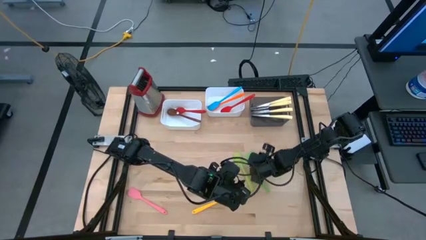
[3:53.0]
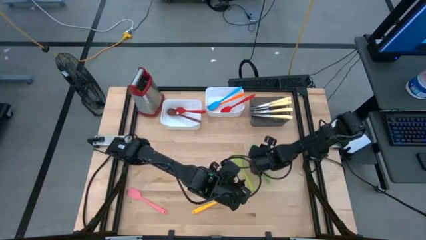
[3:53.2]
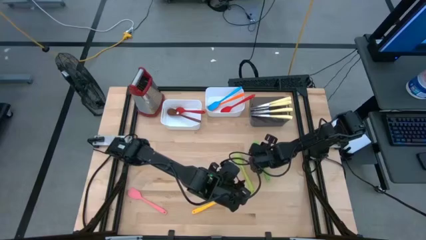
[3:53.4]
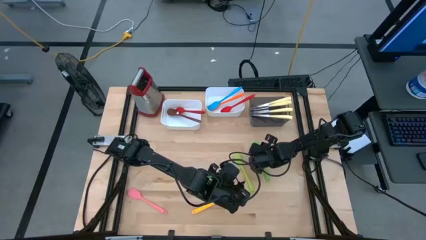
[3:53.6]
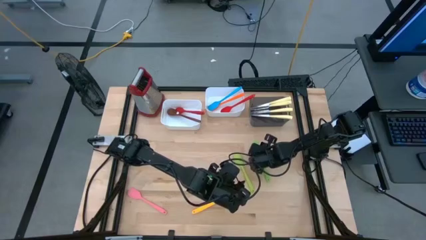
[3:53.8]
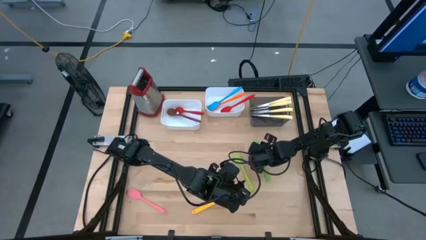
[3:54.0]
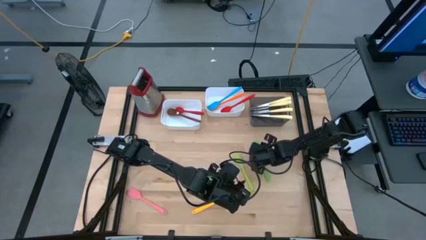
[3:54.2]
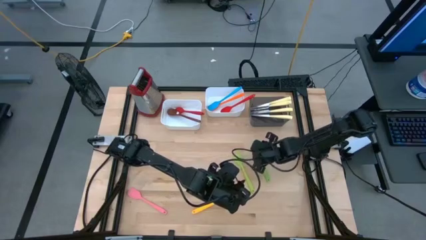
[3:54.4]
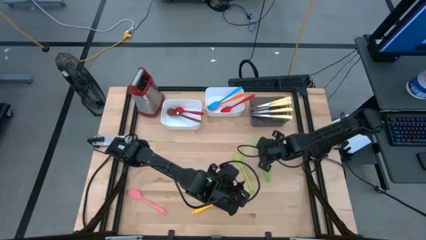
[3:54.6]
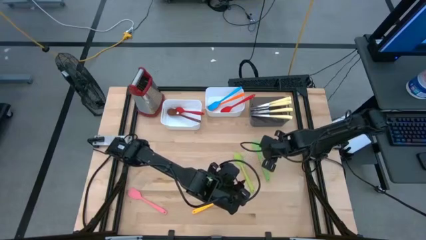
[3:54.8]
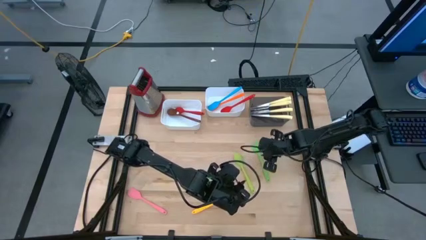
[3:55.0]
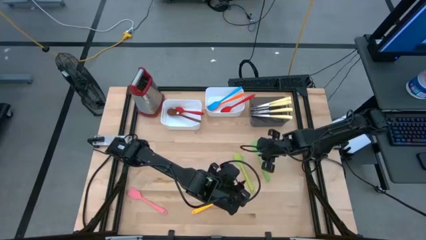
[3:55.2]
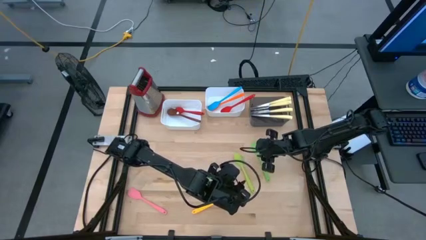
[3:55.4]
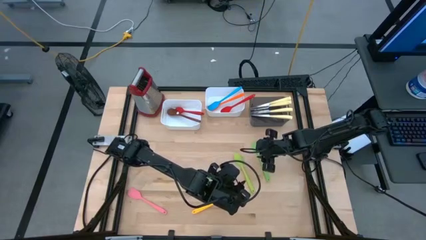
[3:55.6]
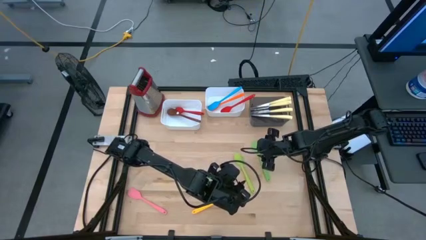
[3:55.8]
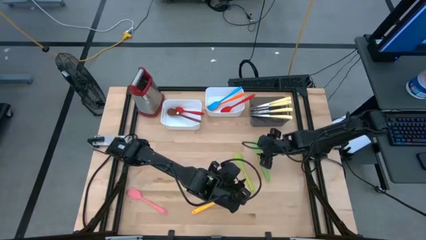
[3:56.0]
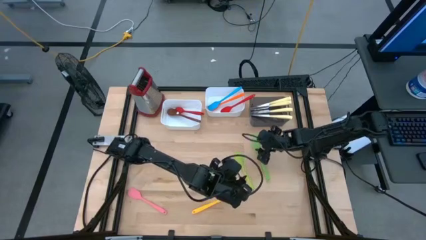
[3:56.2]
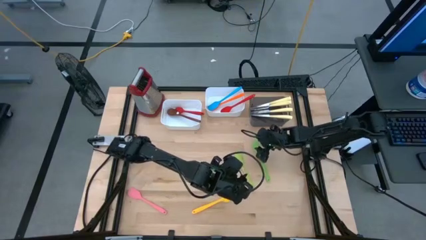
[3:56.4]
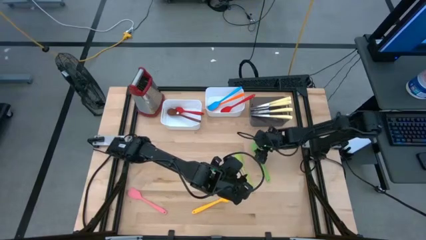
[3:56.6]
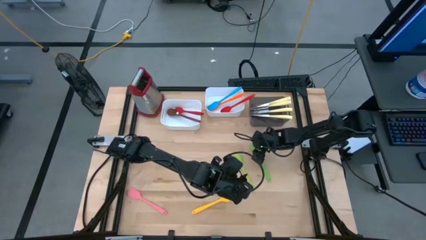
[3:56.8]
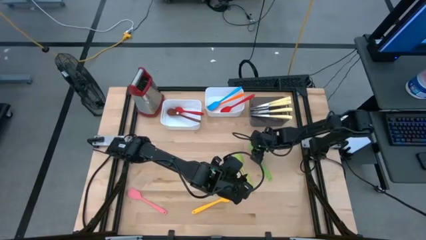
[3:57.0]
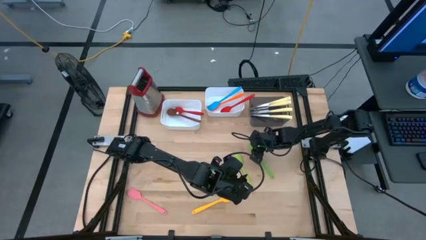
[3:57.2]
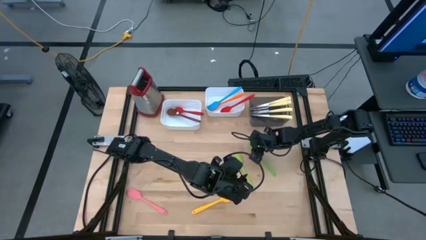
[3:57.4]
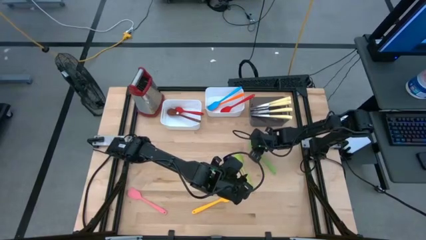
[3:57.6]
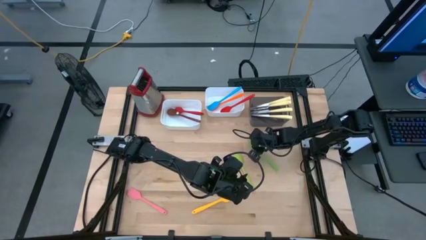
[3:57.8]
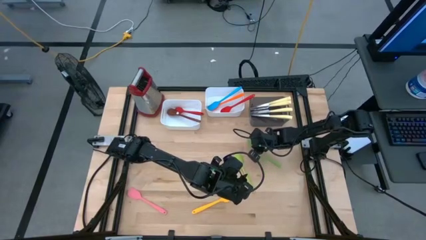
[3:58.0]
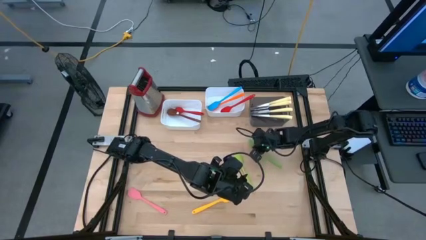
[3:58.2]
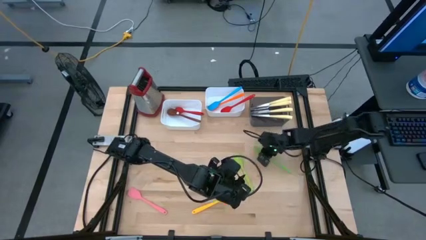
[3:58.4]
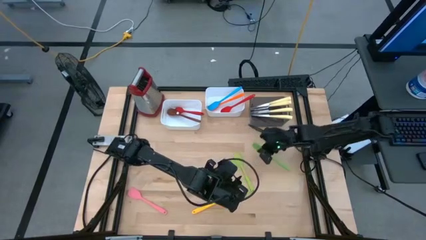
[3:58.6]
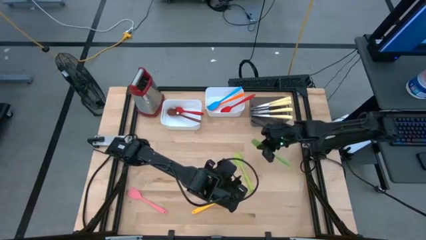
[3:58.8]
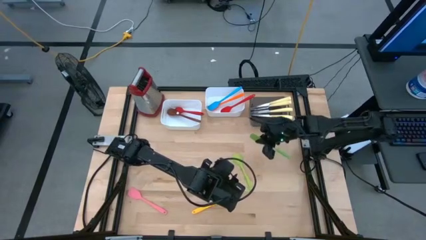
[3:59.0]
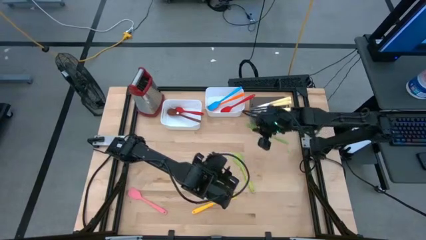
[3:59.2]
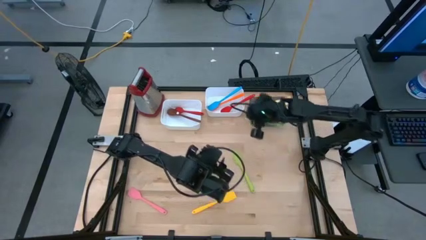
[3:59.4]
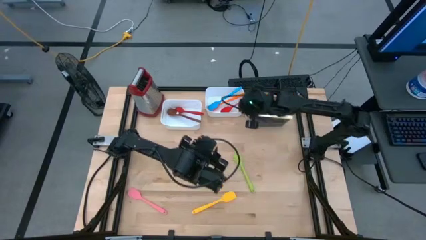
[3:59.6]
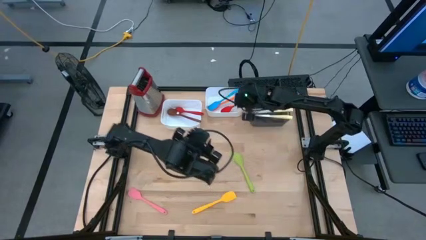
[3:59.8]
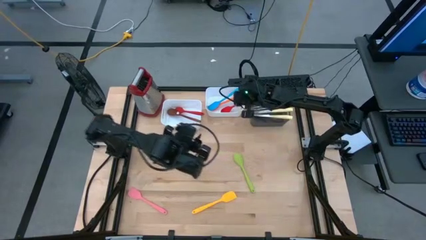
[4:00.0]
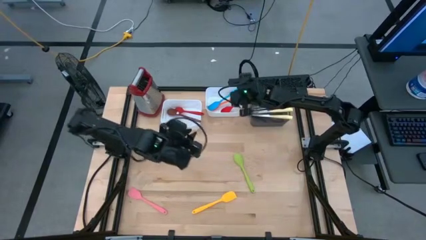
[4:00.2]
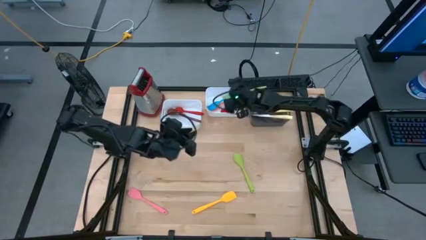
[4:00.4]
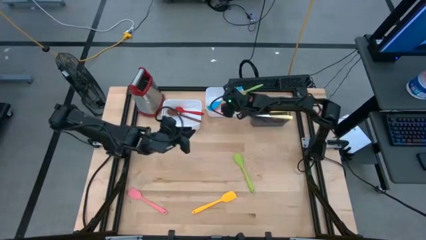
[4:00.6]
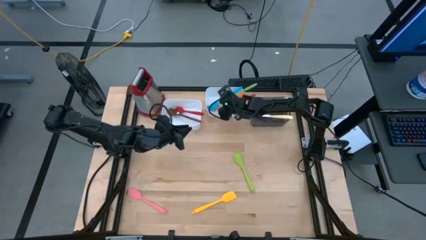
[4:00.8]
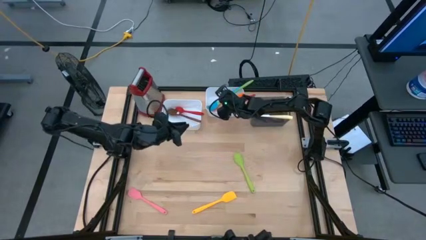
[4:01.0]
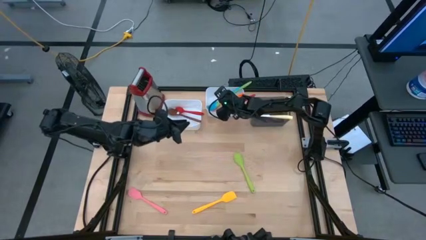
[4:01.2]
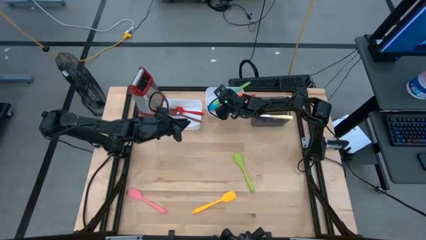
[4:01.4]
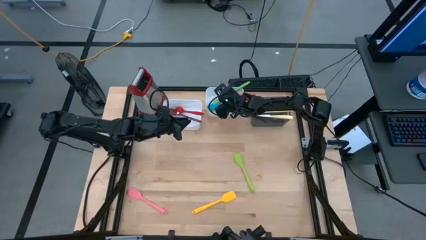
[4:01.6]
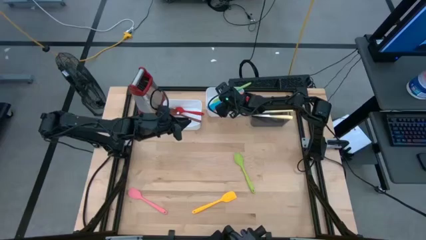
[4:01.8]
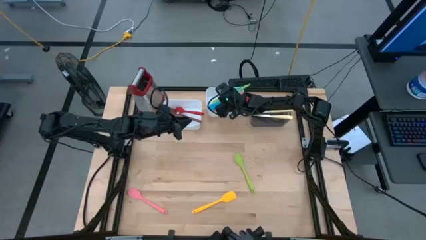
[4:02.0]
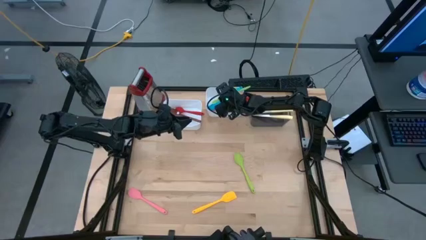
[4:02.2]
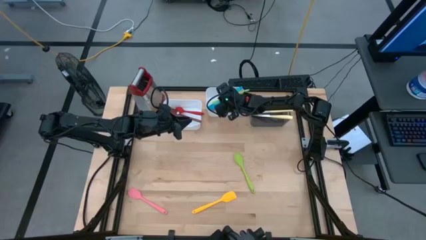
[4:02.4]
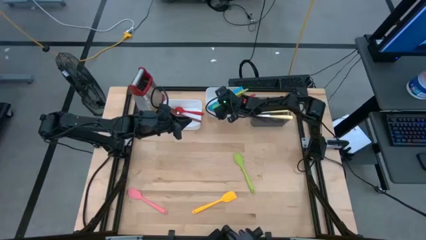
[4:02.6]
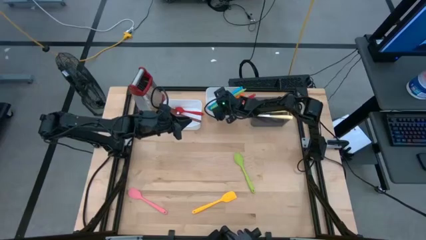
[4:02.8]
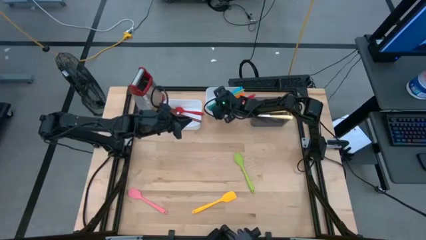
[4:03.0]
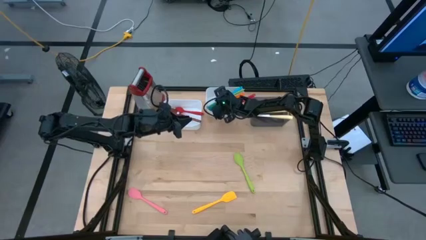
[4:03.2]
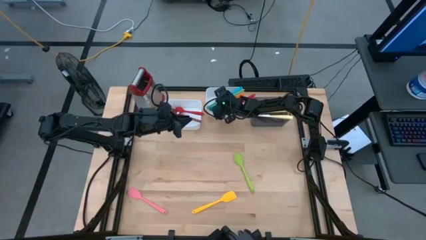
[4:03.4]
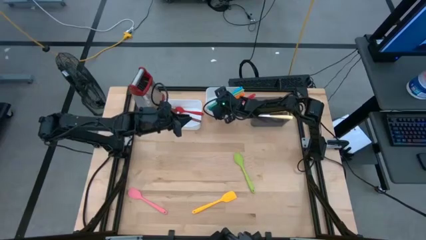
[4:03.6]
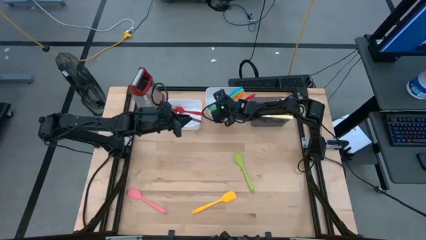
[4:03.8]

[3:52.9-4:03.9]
Task: Pick & Place Kitchen Items
Put the green spatula into the right white bin
